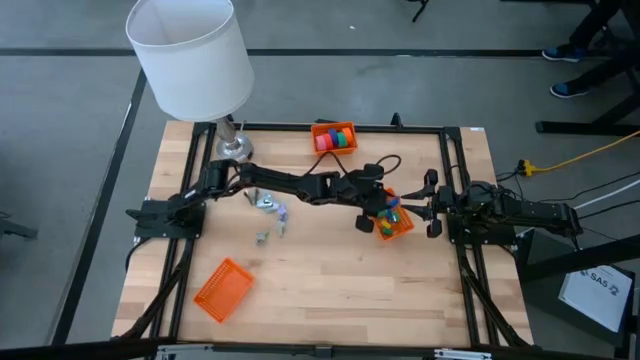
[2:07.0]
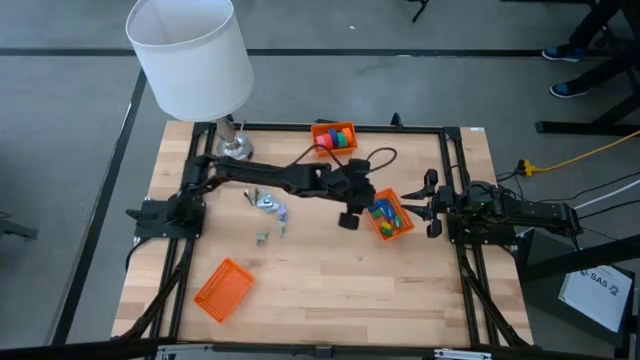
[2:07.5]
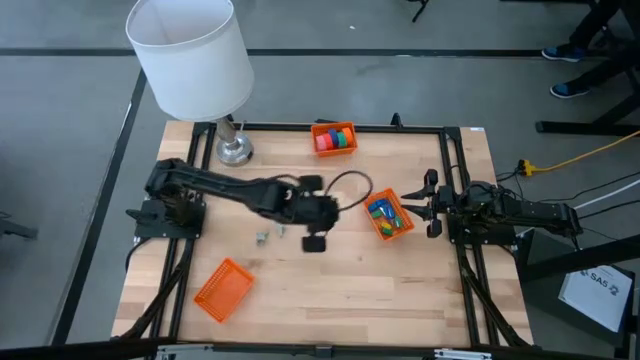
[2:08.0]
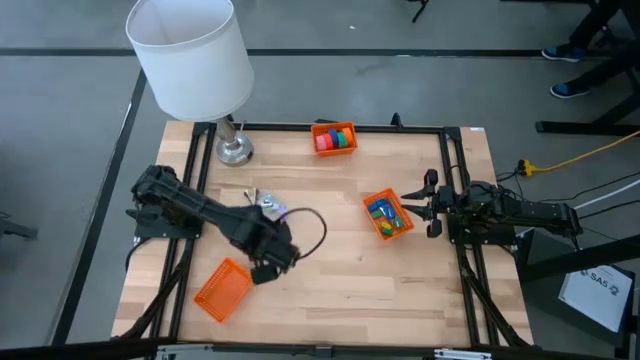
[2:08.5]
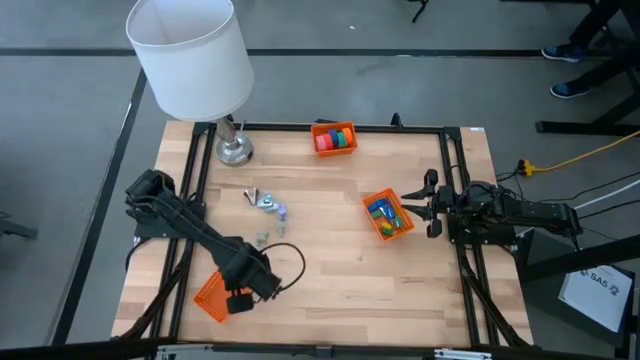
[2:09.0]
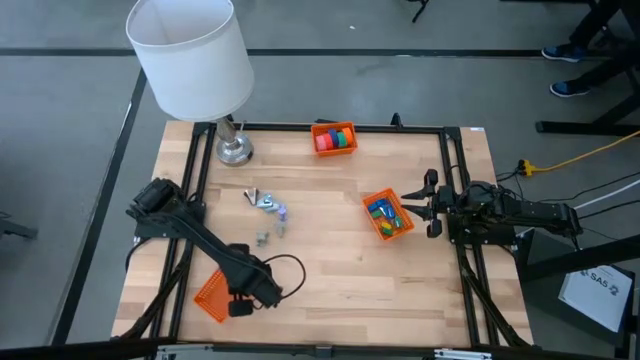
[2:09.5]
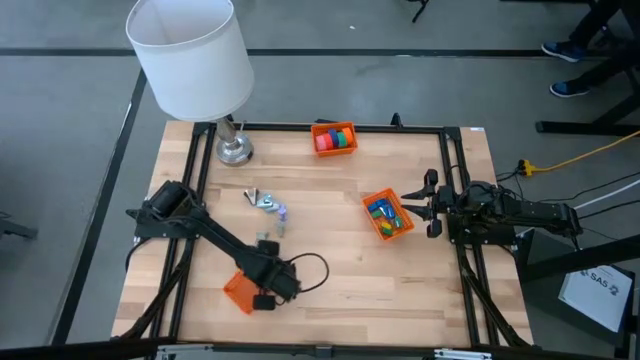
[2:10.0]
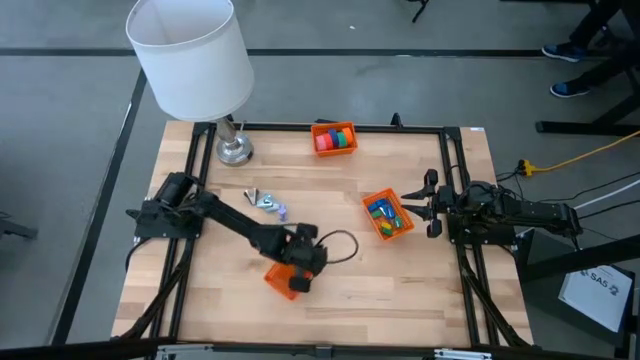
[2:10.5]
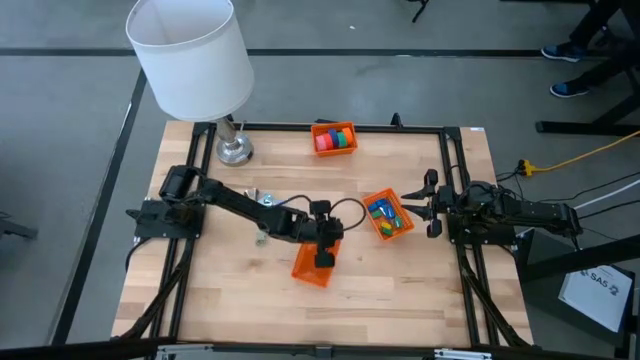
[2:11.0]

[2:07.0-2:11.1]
Task: Pick and place Stapler, Stapler remover, tape
Move the bottom orange bin to the bottom left of the middle orange bin

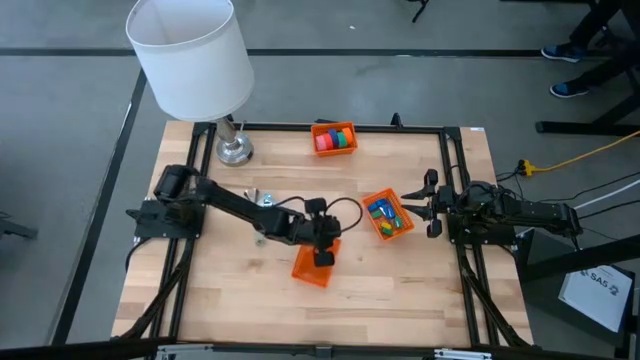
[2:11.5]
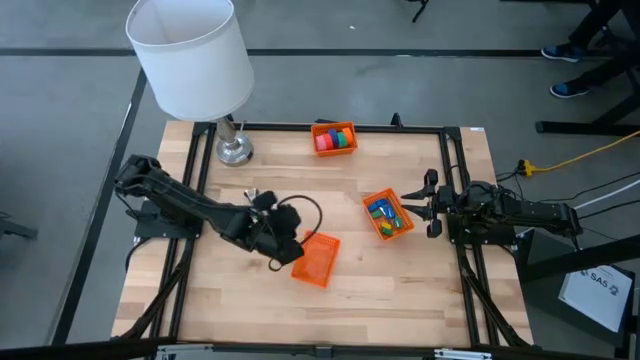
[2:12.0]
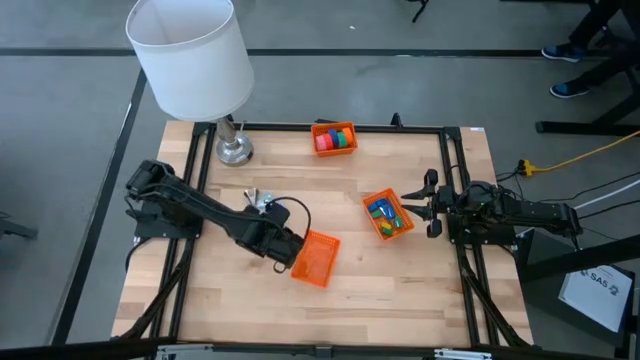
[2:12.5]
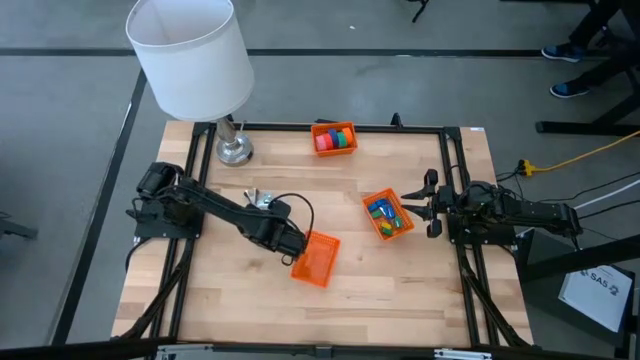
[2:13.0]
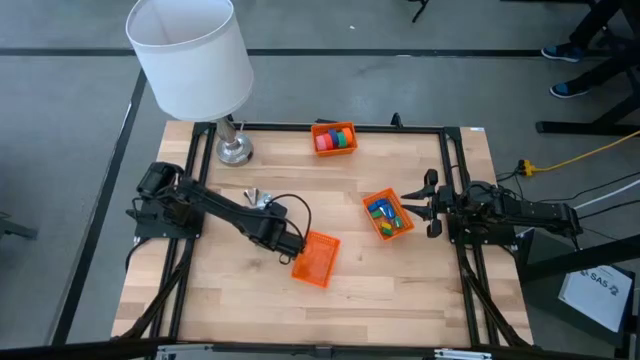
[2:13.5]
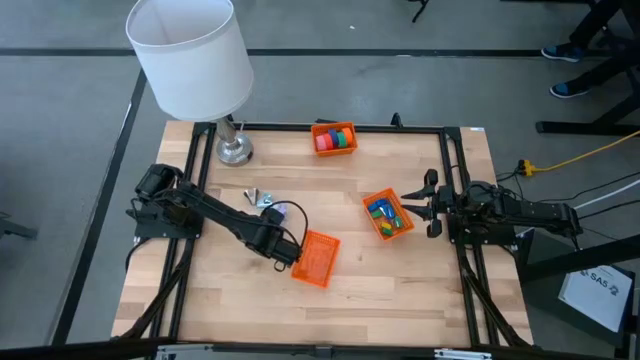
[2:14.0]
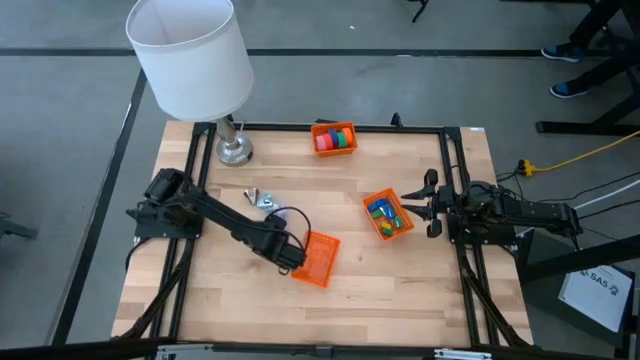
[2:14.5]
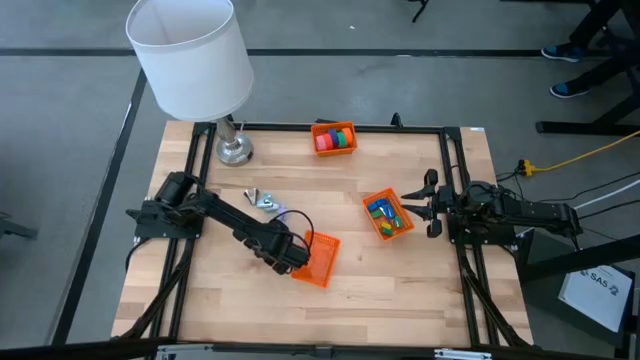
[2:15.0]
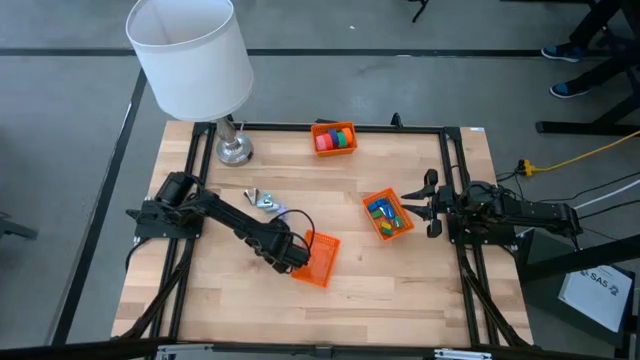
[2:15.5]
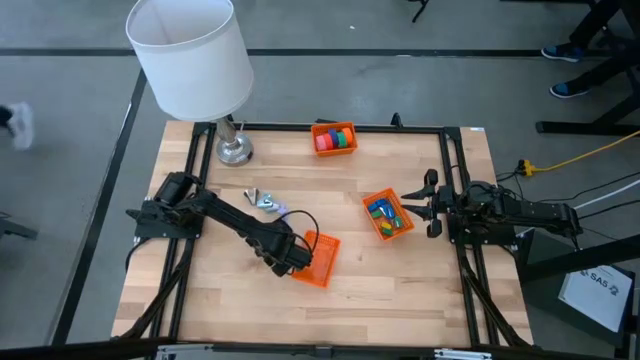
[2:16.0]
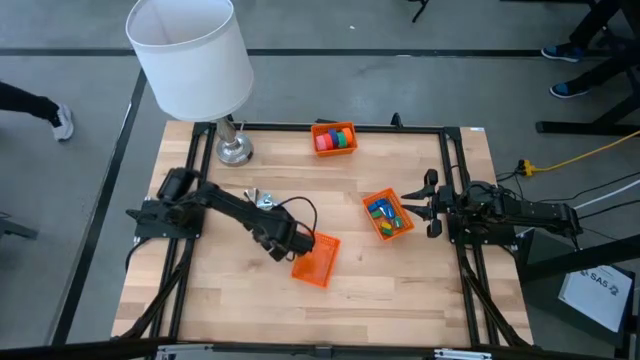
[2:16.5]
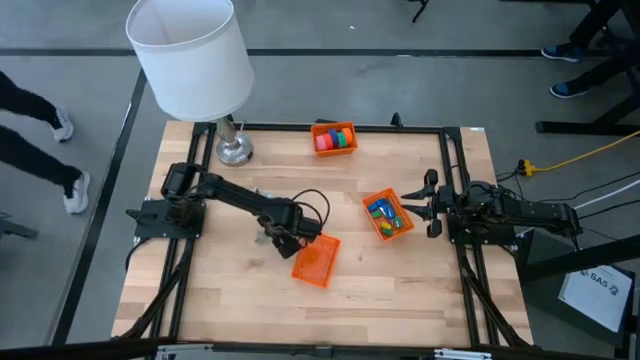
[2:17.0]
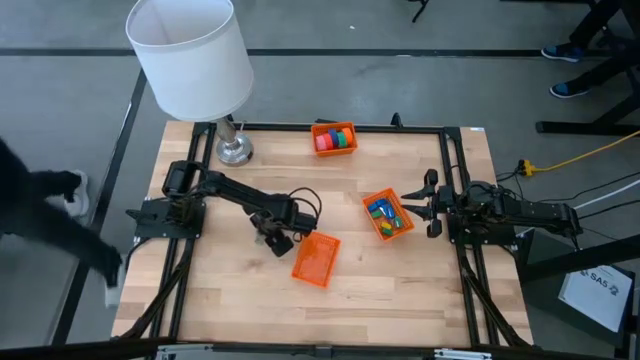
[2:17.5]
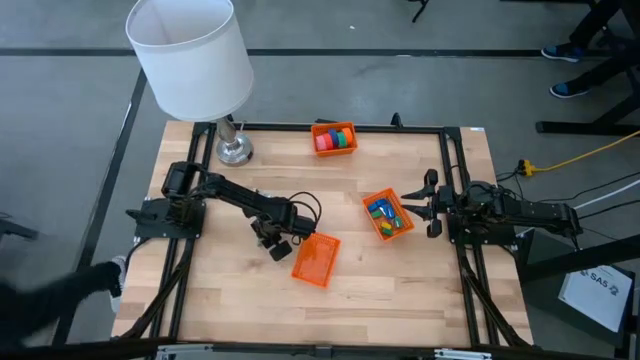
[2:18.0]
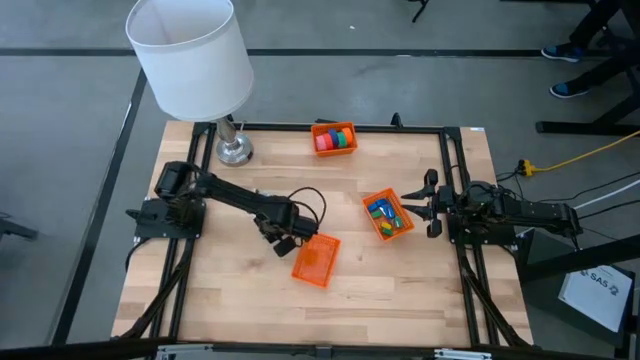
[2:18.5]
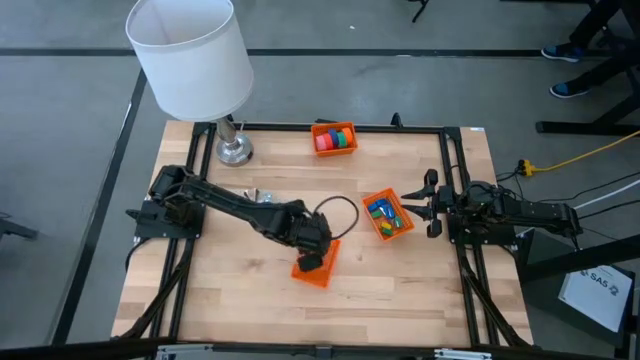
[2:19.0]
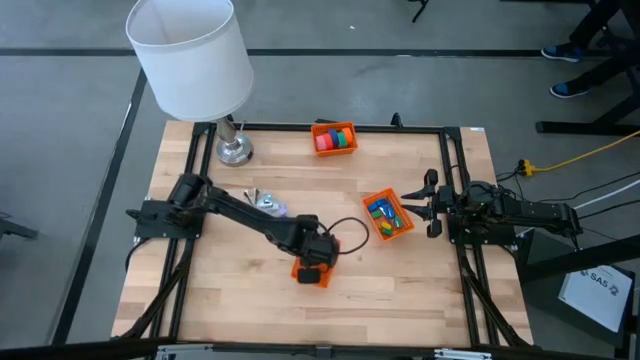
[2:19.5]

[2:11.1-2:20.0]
Put the gray staple remover into the bottom orange bin

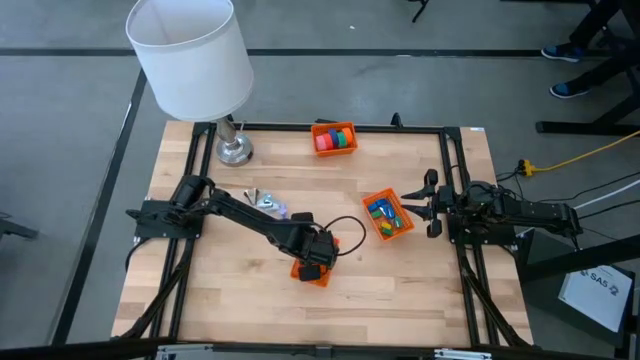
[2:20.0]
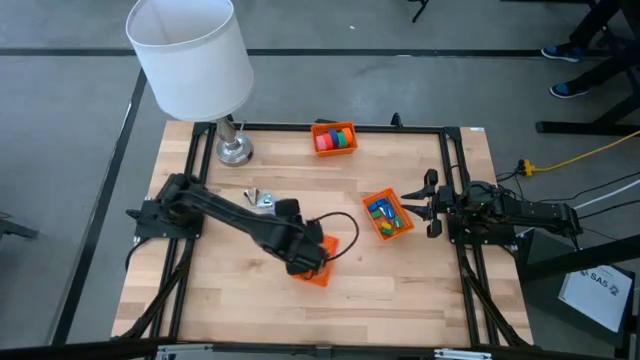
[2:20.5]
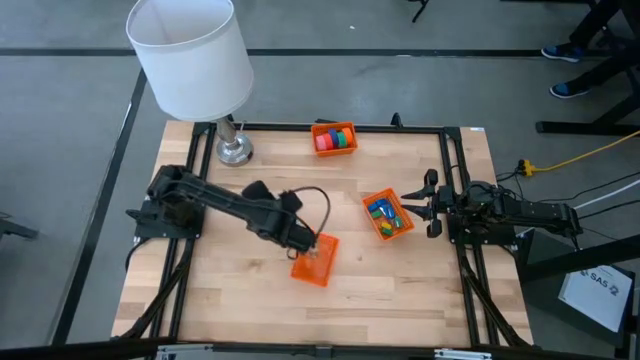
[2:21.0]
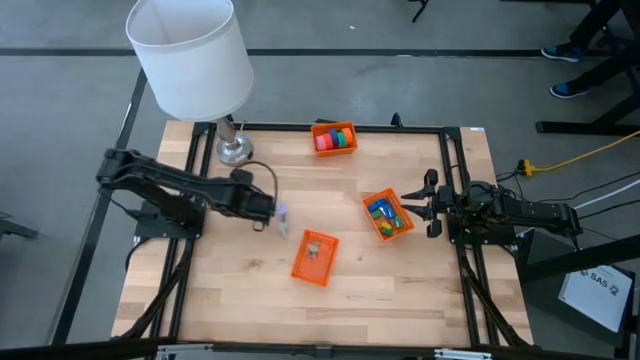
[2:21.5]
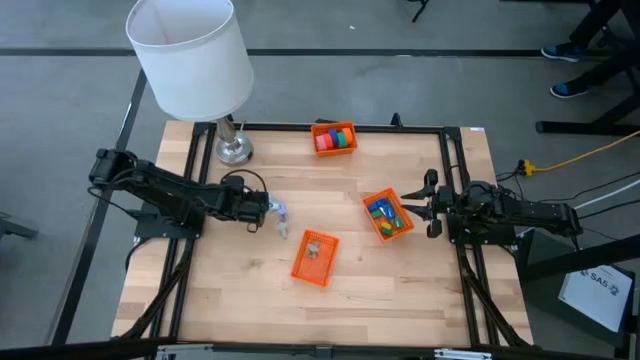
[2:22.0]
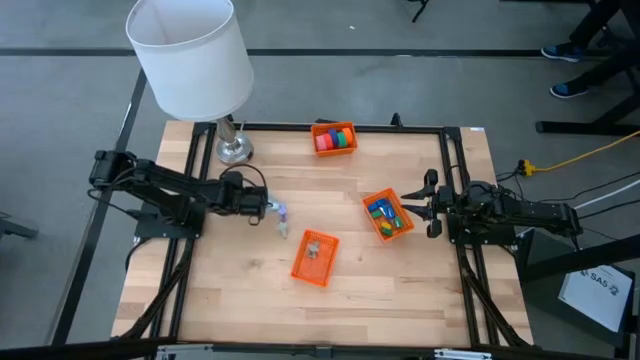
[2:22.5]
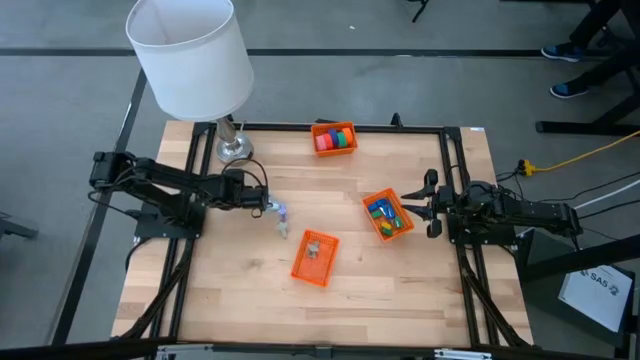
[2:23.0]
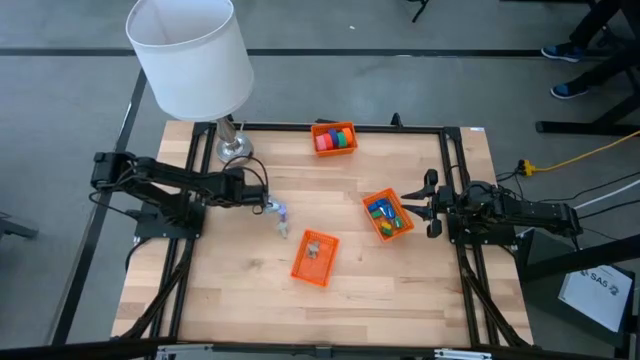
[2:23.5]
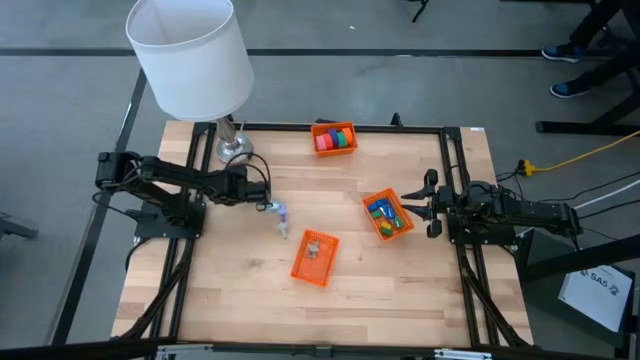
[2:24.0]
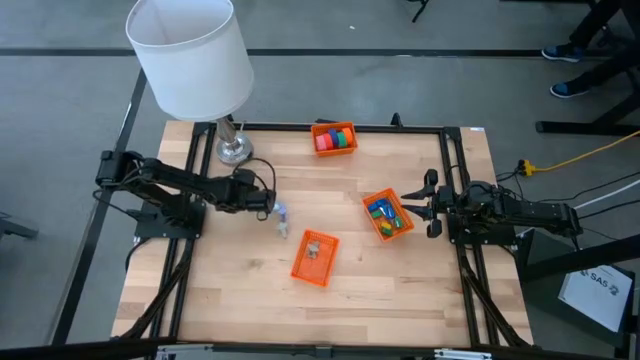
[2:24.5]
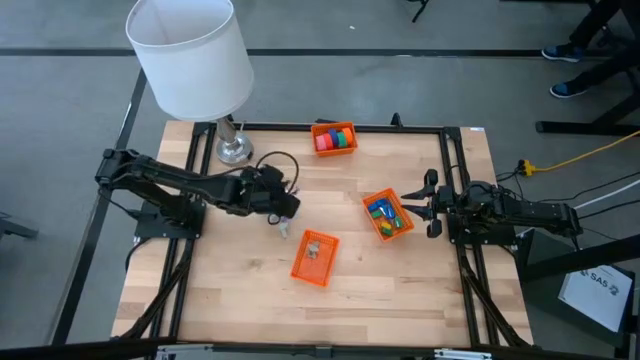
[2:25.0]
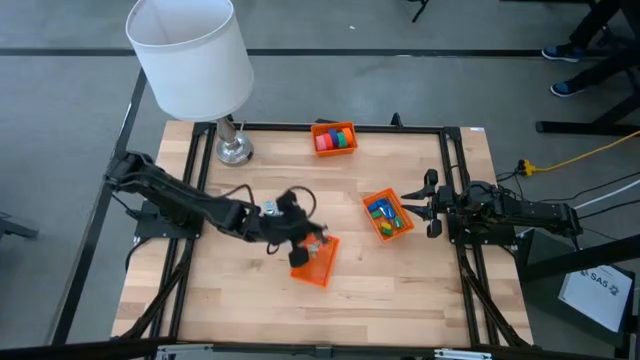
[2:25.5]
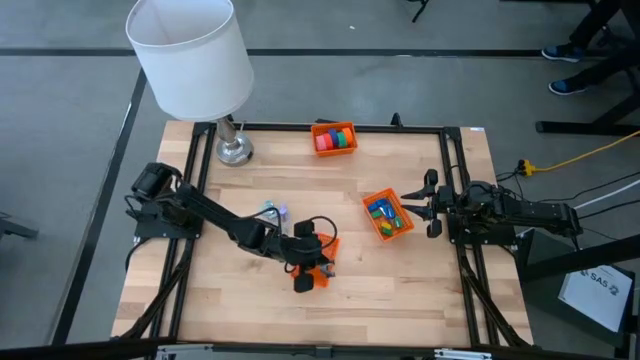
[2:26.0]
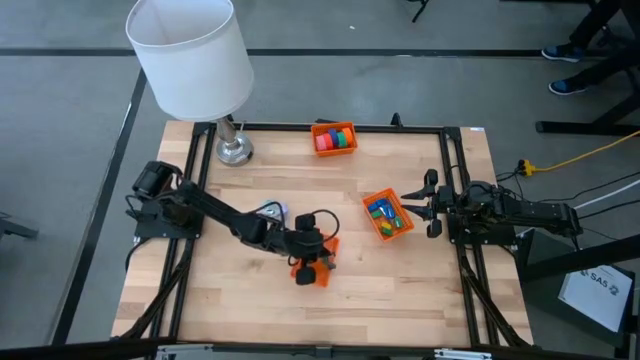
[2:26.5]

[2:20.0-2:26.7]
Put the black staple remover into the bottom orange bin

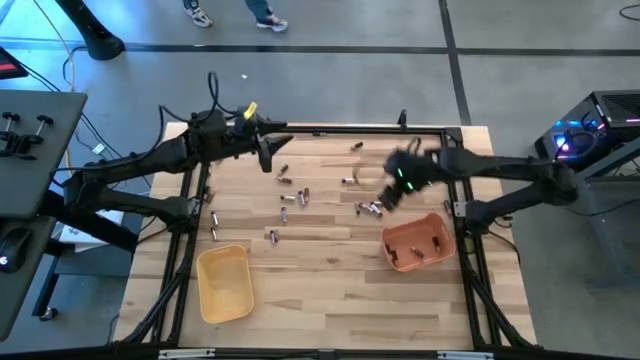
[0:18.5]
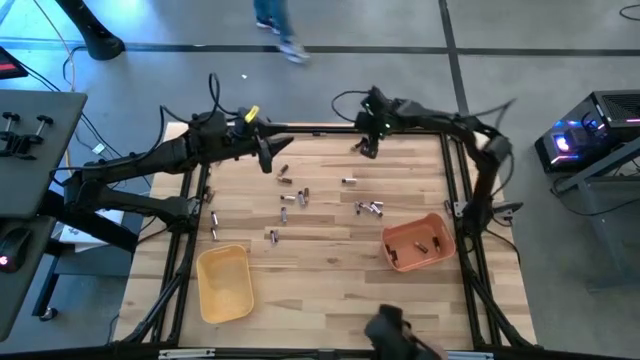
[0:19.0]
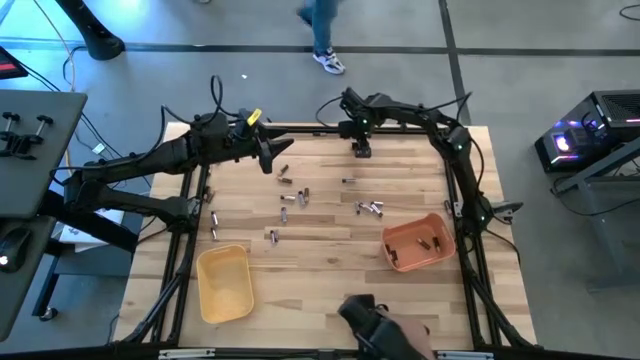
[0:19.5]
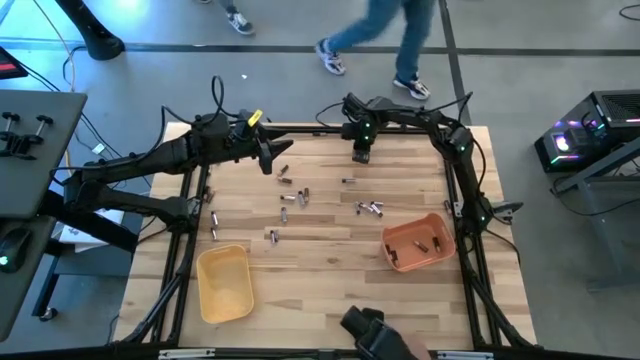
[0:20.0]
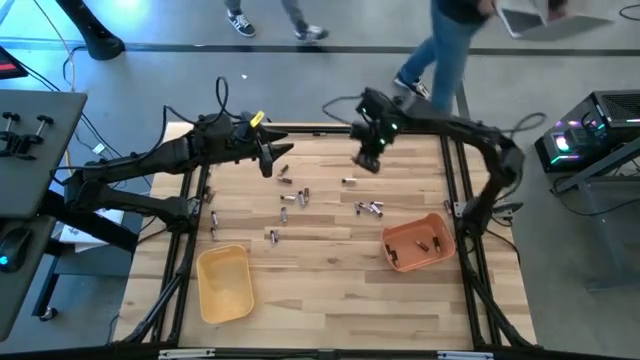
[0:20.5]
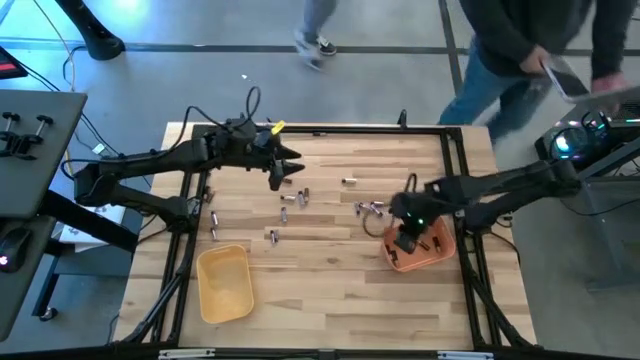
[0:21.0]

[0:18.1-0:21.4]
Task: Sort batteries
Put the black battery into the orange bin
